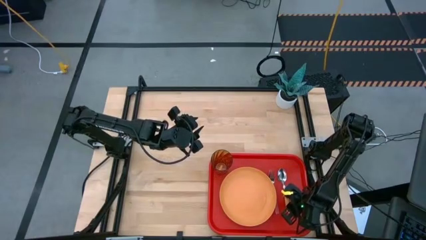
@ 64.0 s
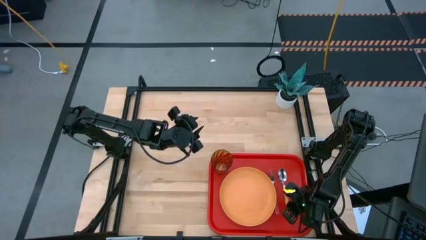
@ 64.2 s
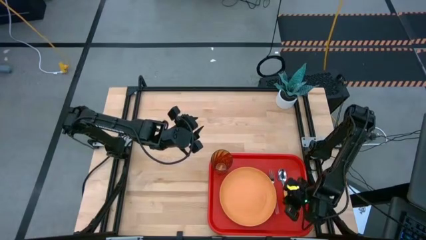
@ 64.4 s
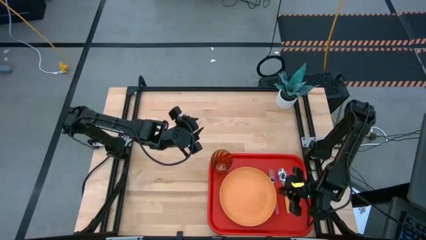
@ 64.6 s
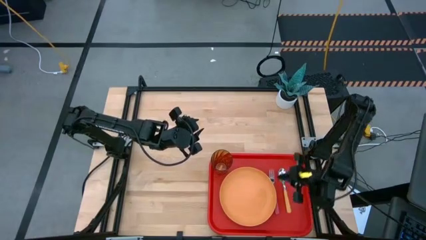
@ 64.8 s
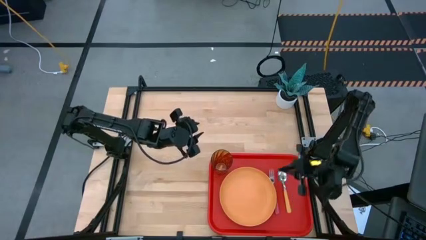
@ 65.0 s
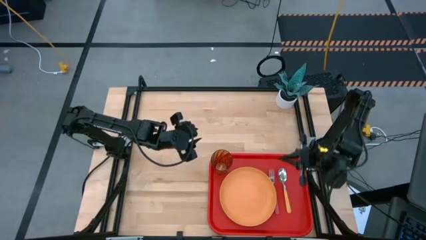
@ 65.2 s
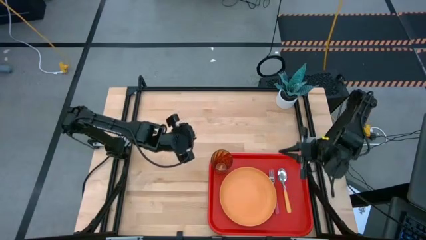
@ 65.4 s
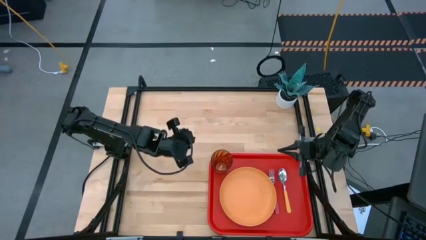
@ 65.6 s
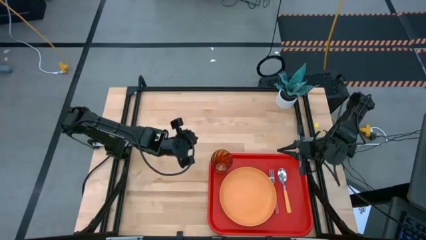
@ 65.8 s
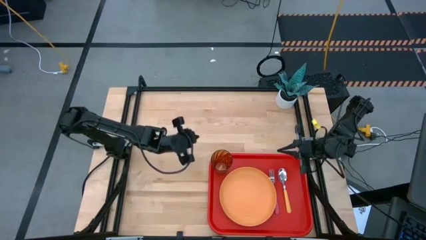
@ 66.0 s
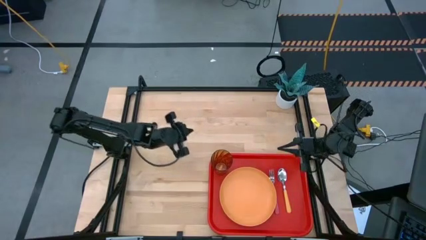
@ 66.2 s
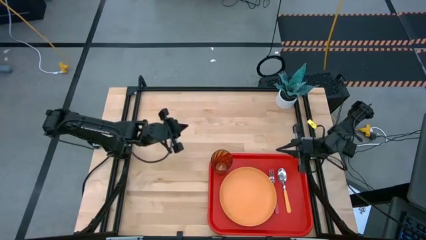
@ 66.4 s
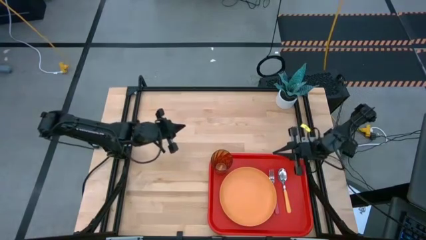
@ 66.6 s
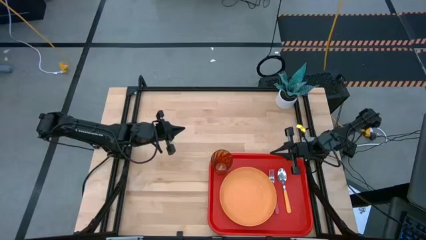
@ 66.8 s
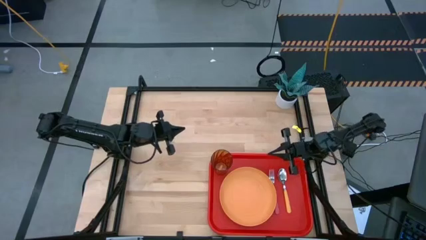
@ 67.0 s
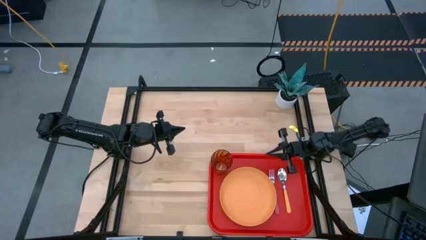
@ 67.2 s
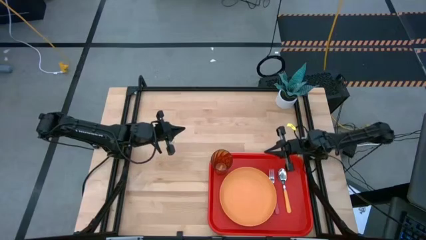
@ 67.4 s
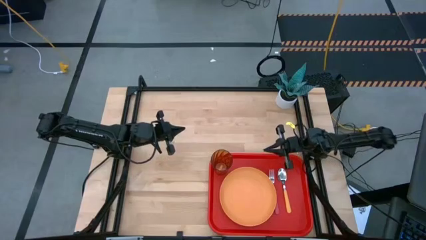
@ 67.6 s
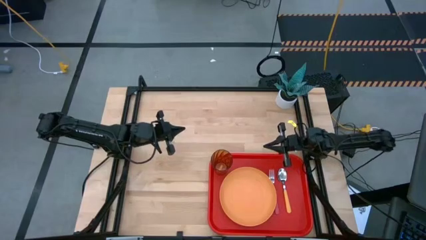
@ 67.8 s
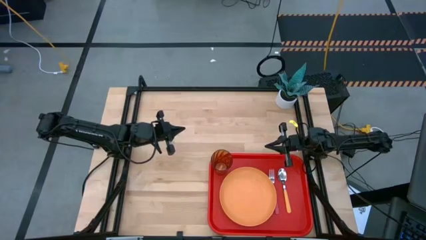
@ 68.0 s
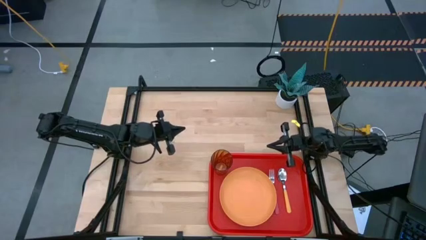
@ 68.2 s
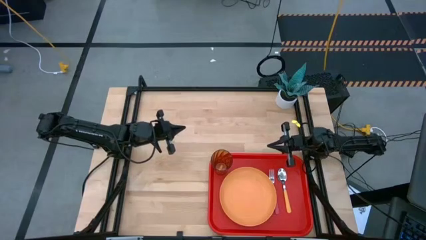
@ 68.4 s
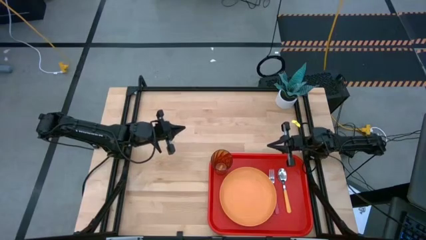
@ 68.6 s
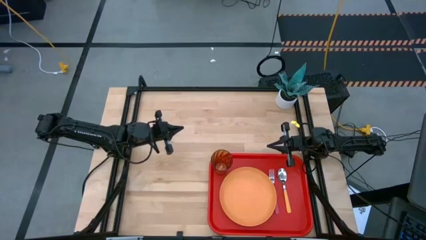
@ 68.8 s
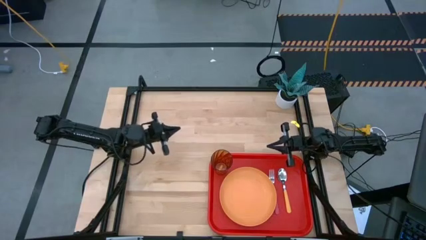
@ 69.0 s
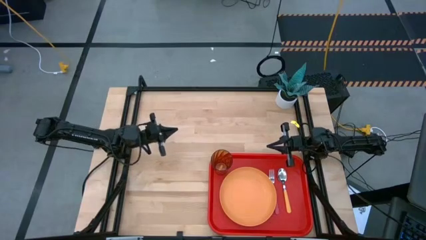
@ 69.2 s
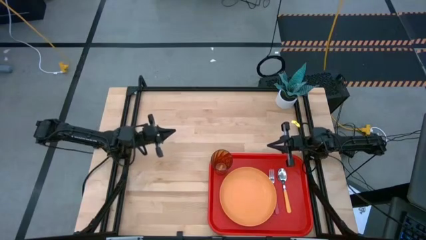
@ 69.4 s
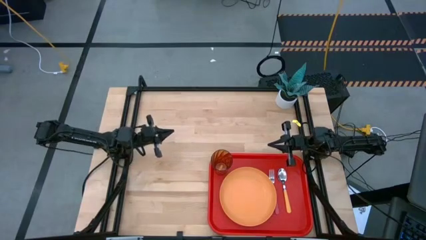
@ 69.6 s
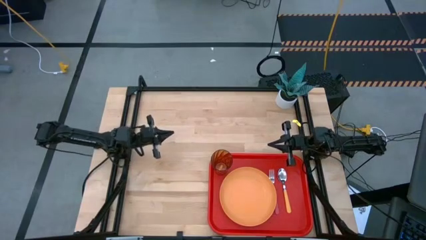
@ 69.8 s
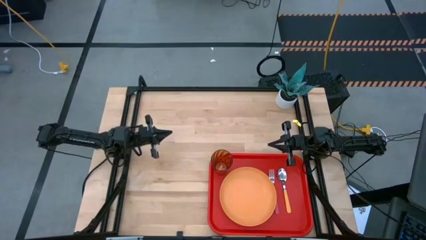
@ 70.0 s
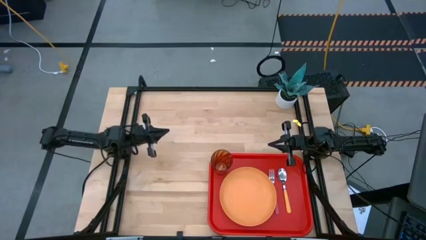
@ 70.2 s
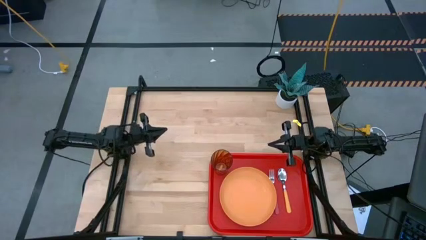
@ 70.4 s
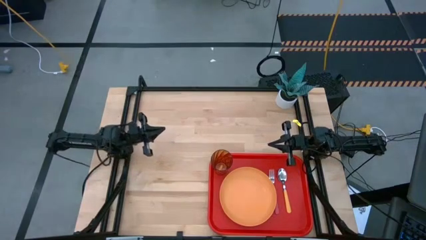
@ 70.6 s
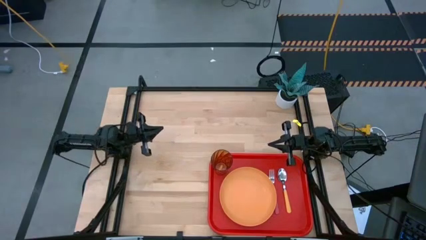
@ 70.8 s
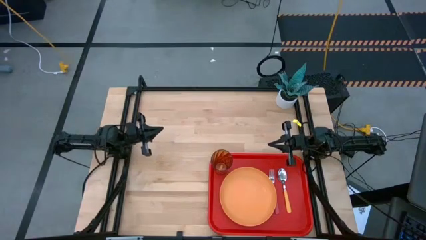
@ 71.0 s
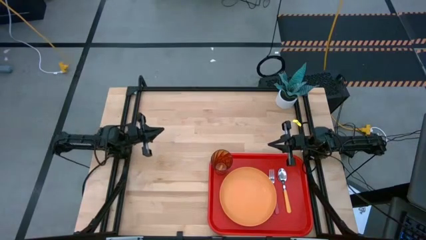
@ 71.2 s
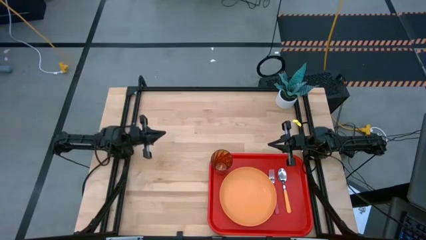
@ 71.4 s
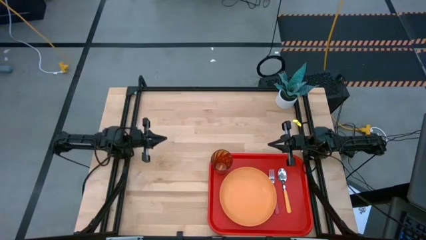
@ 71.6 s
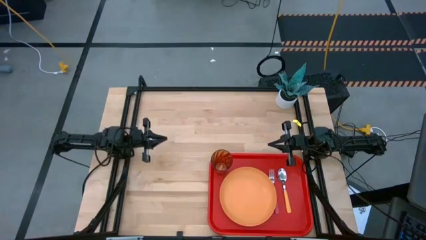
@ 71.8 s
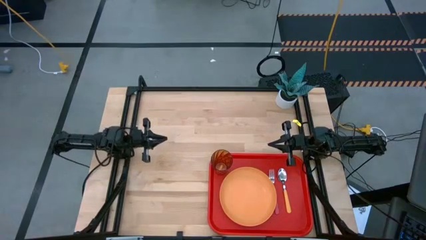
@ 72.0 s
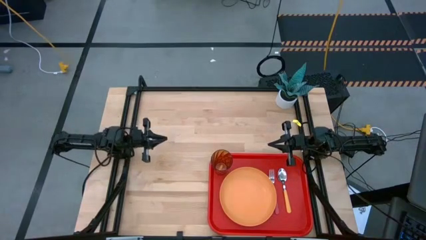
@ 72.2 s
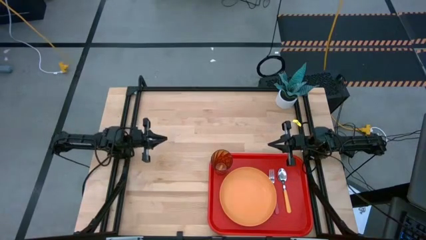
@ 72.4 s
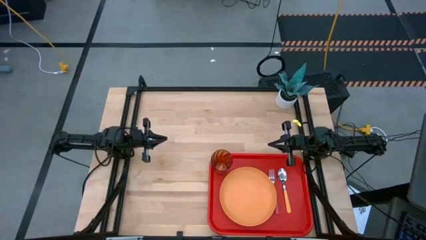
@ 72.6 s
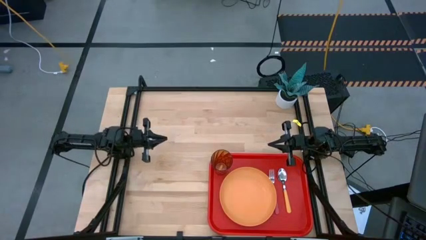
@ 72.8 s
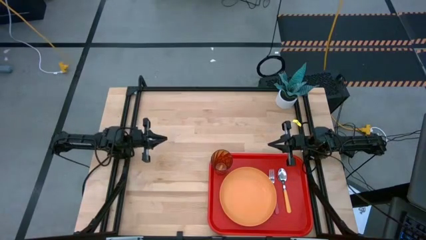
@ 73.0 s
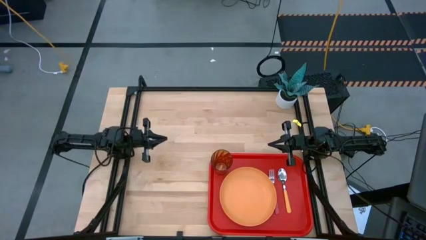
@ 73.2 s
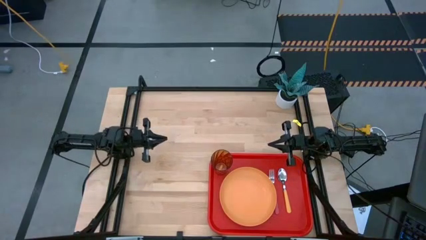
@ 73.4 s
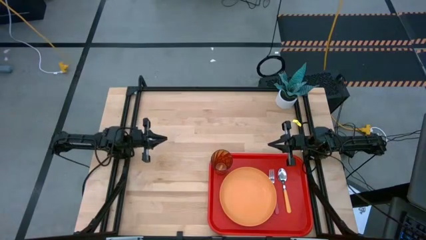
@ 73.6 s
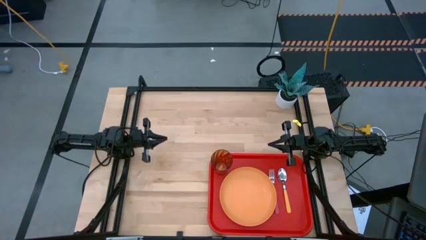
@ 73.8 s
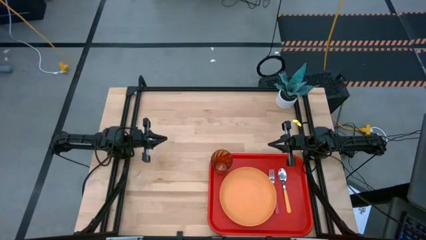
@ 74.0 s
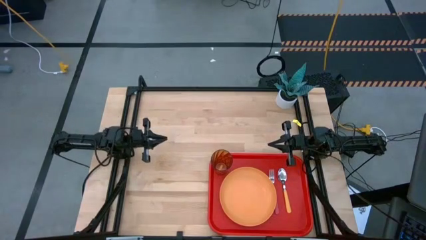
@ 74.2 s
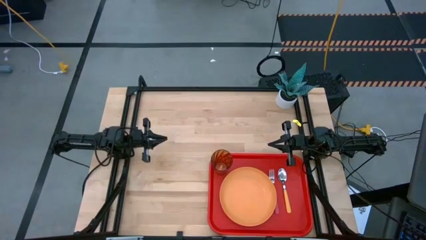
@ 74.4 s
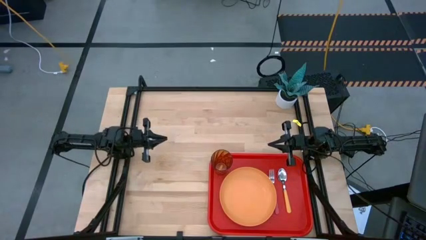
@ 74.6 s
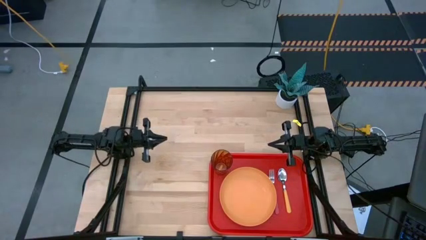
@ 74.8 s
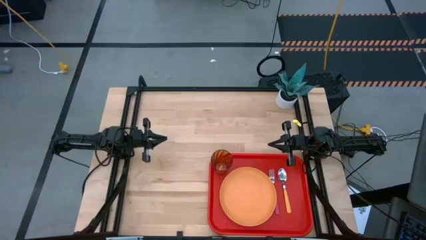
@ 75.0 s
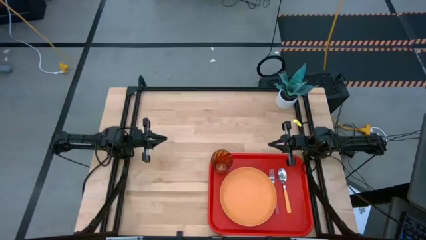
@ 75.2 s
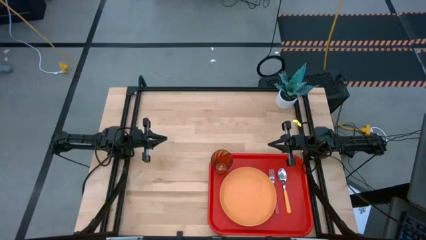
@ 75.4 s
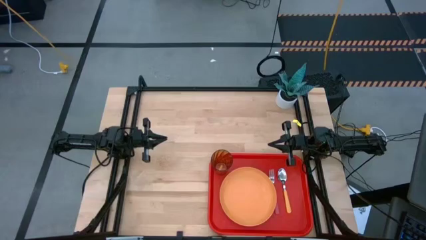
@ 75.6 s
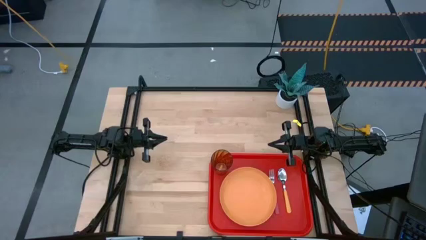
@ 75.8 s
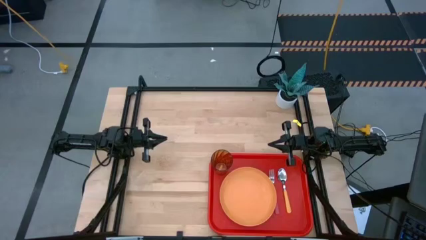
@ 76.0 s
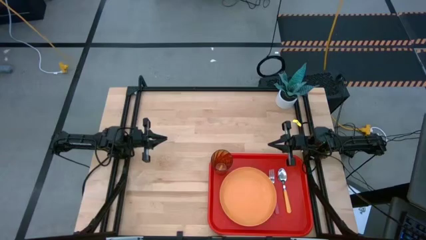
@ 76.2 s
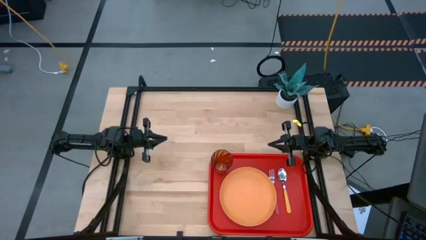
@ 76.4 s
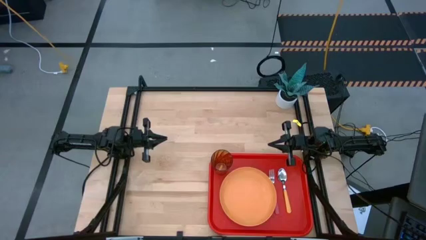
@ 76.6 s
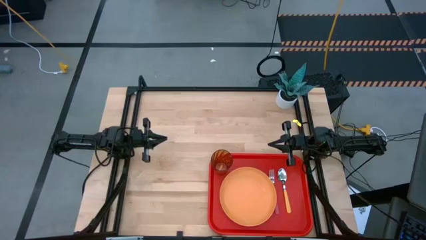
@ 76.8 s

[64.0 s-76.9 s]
Task: Pick and place plate/cup/fork/spoon on tray
Return to Home Position

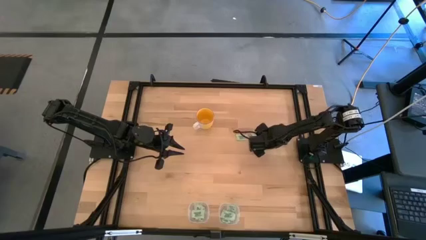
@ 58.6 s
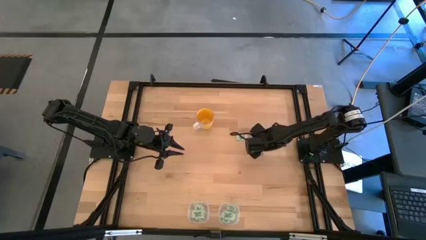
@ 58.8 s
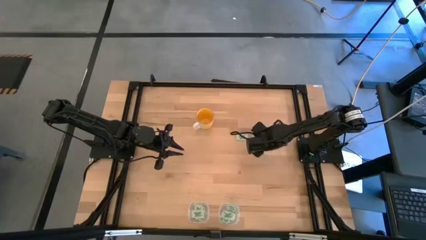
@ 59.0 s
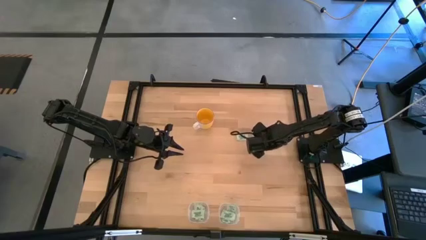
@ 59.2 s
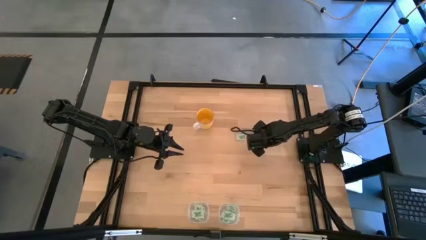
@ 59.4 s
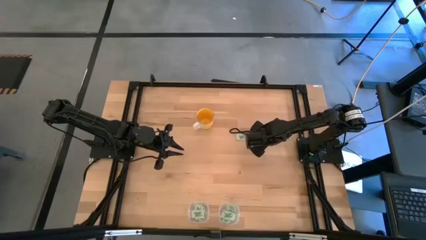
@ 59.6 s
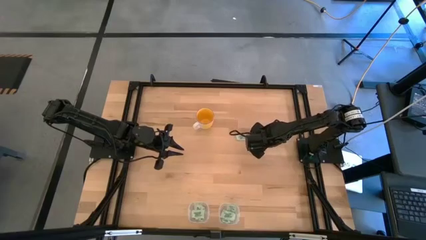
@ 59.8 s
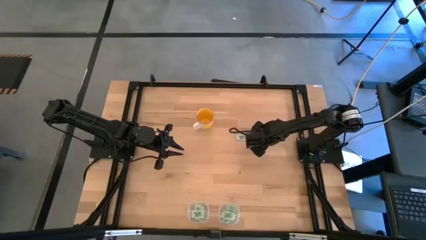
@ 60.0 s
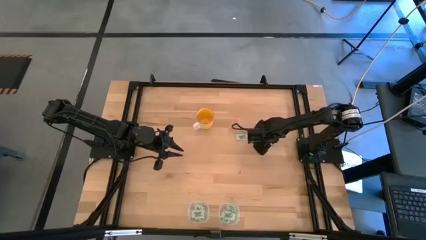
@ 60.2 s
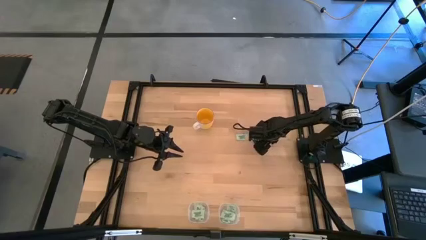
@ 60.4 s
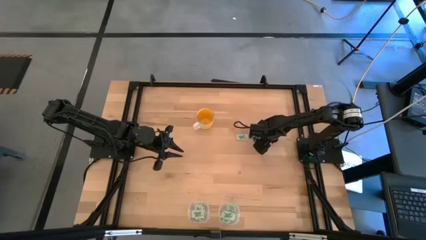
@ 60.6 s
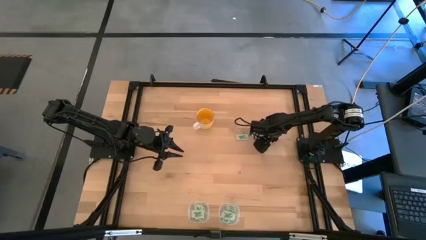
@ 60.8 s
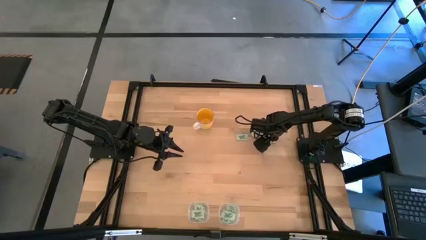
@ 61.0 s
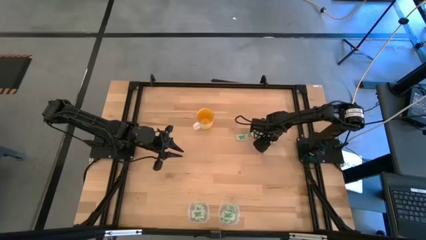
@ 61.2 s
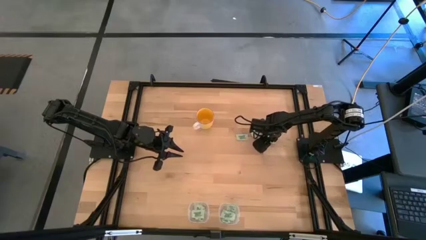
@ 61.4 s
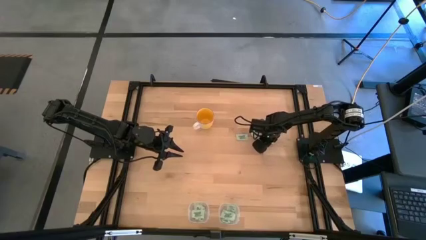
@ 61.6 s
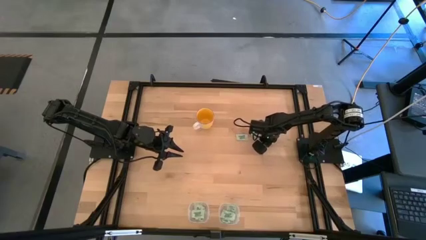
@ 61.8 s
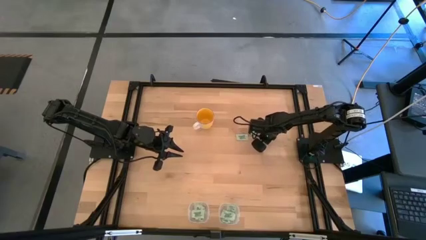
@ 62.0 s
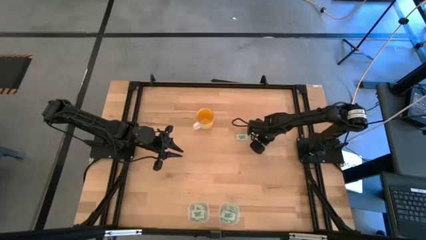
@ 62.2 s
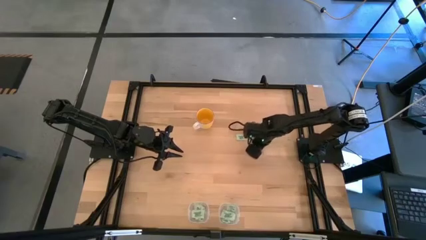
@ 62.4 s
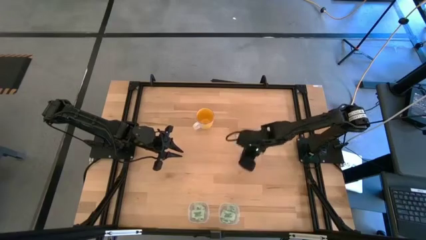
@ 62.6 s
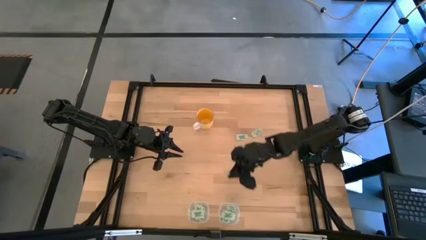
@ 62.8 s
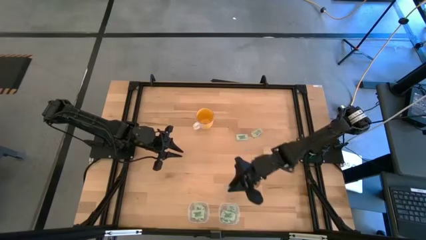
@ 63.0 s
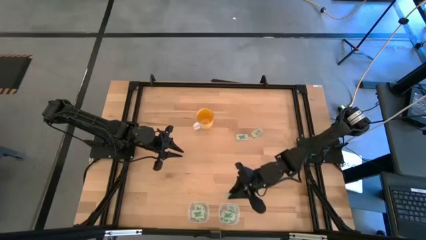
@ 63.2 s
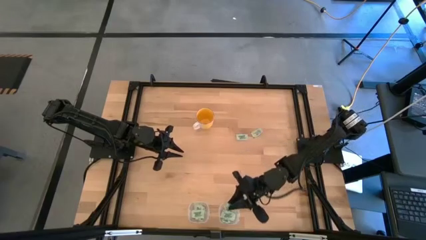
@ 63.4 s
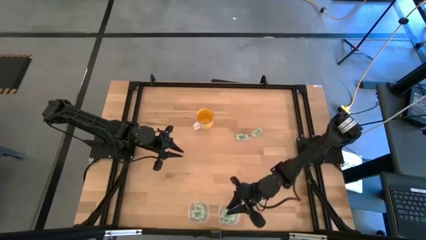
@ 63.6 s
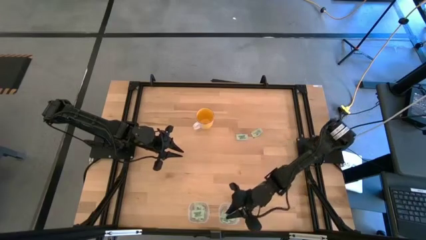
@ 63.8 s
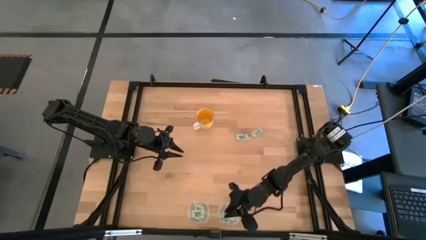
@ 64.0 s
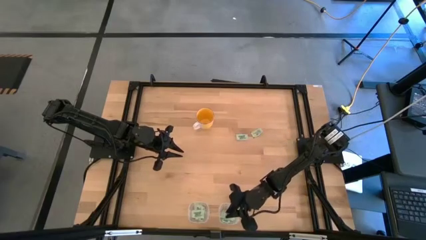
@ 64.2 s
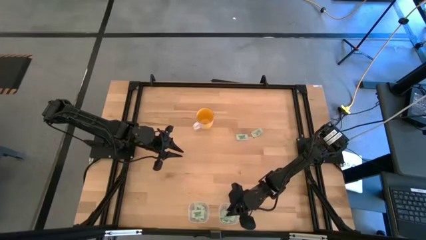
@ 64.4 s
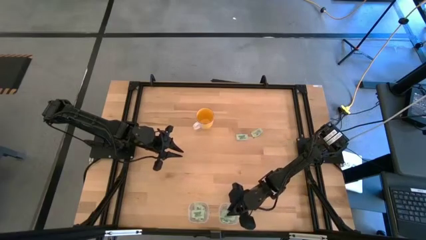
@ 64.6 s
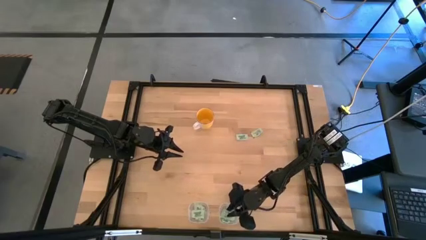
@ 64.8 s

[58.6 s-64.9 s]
Task: Pick and place items into bin
Put the green stevia packet into the right transparent bin
